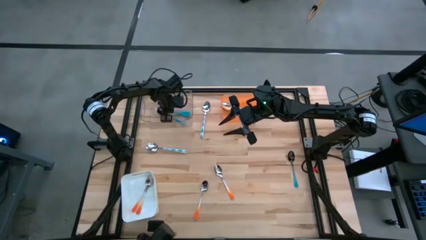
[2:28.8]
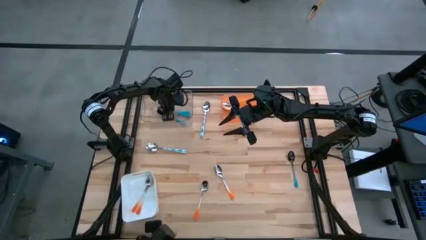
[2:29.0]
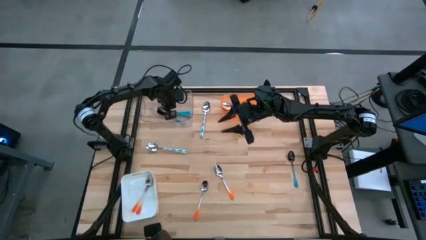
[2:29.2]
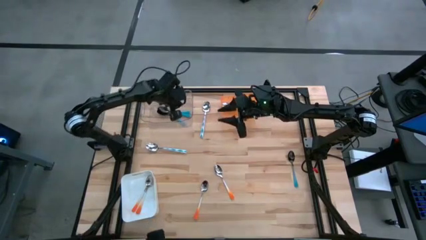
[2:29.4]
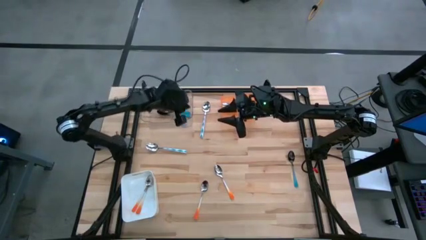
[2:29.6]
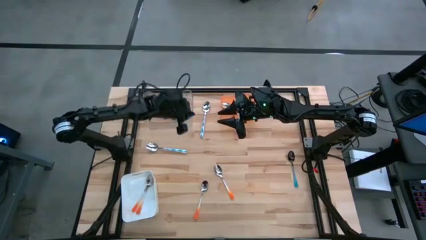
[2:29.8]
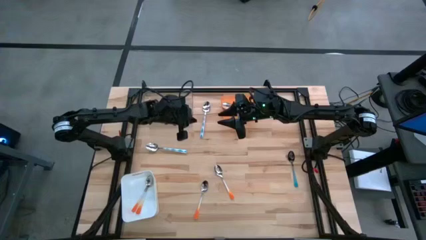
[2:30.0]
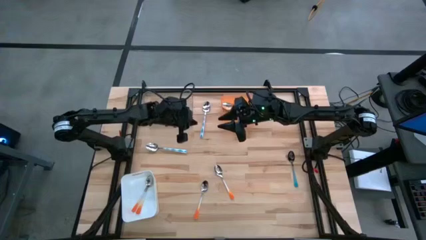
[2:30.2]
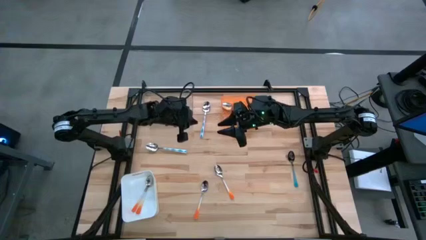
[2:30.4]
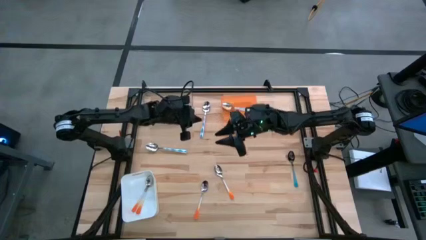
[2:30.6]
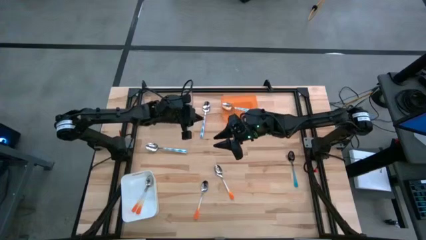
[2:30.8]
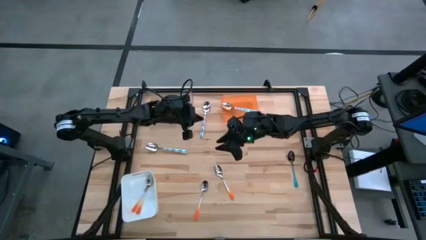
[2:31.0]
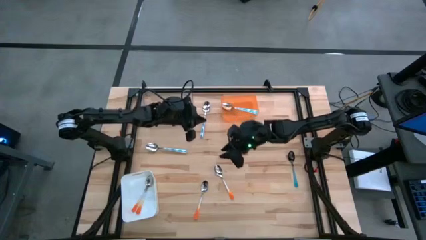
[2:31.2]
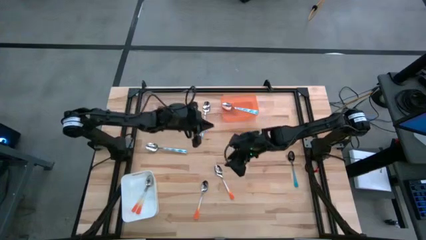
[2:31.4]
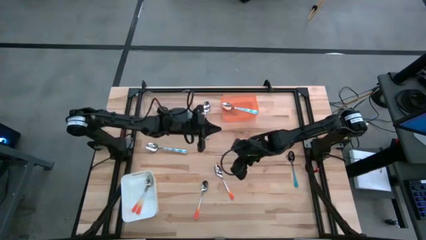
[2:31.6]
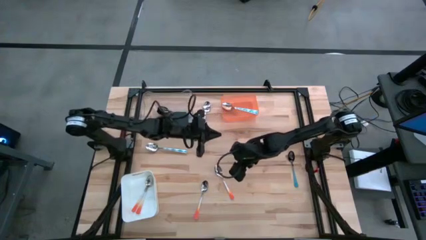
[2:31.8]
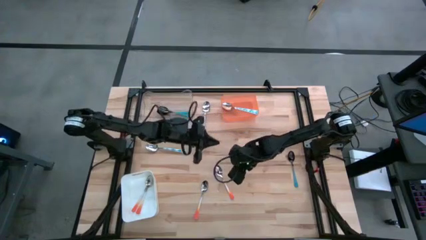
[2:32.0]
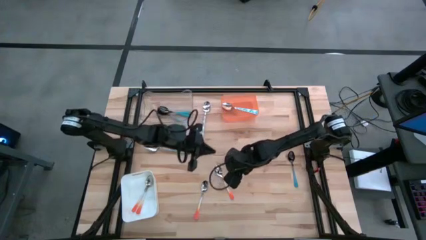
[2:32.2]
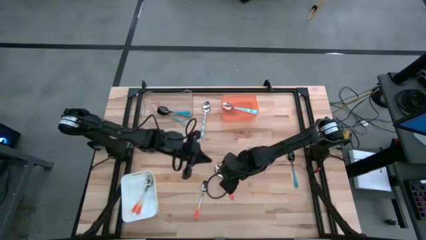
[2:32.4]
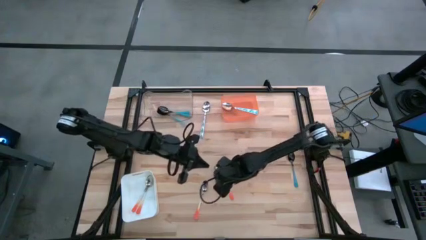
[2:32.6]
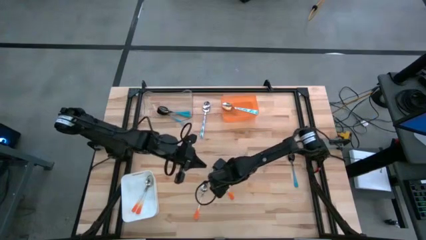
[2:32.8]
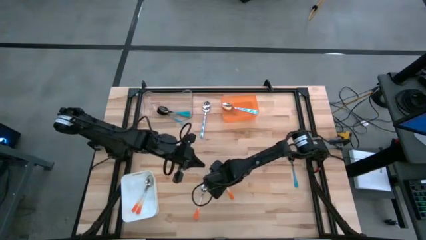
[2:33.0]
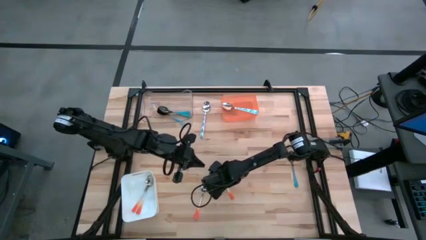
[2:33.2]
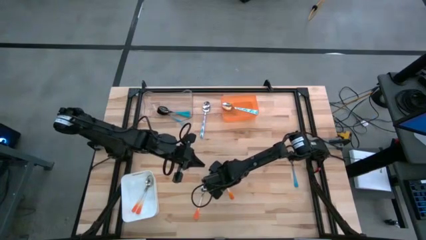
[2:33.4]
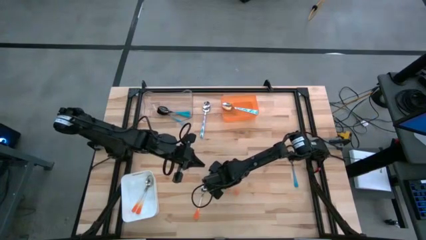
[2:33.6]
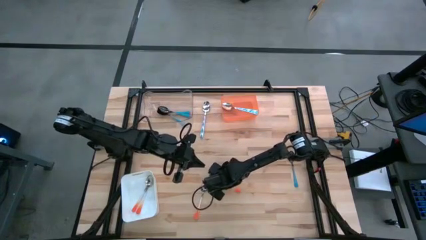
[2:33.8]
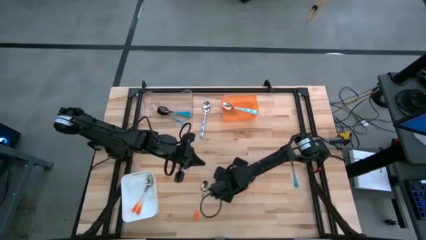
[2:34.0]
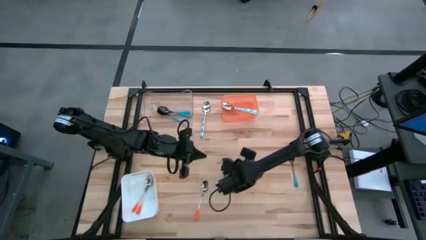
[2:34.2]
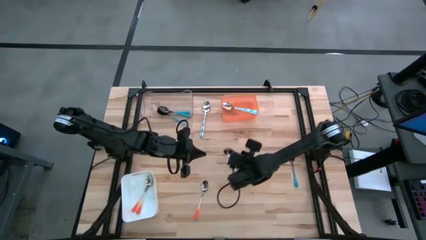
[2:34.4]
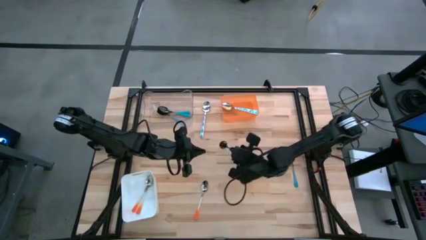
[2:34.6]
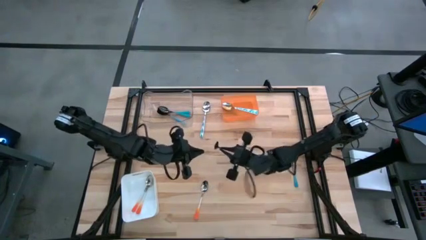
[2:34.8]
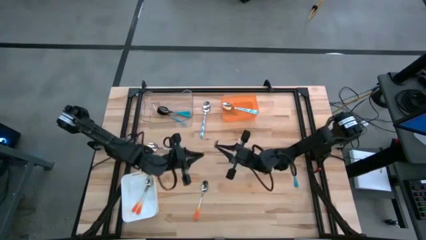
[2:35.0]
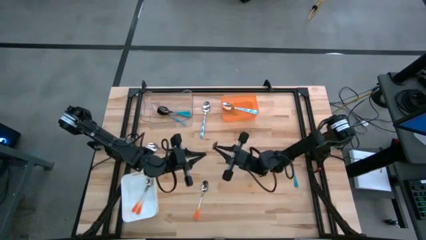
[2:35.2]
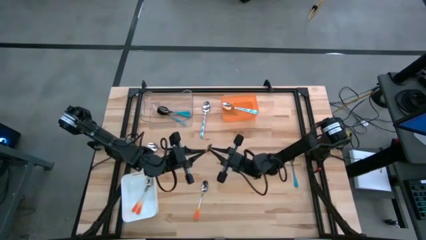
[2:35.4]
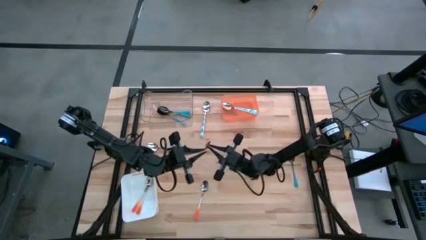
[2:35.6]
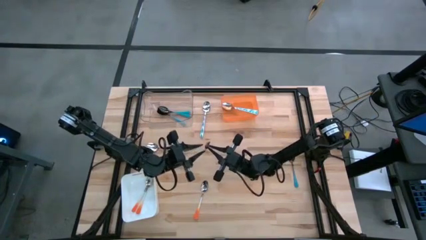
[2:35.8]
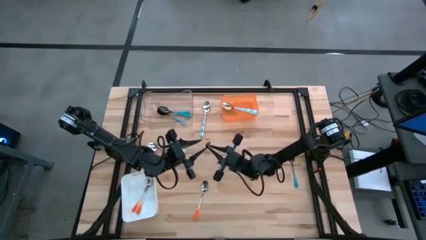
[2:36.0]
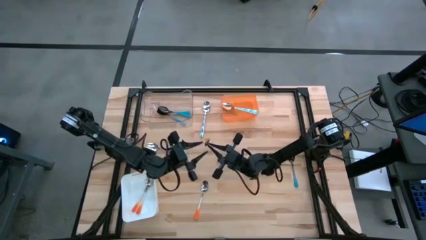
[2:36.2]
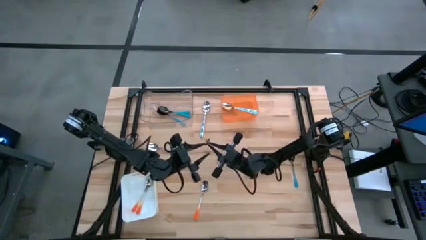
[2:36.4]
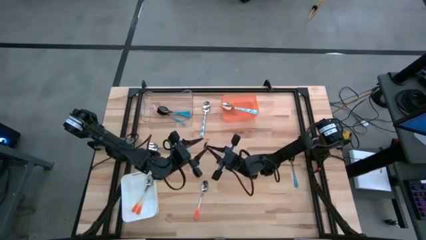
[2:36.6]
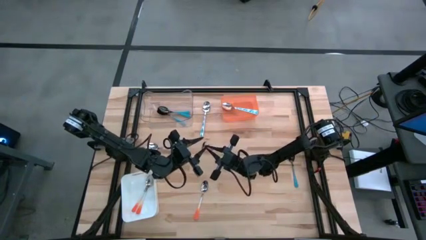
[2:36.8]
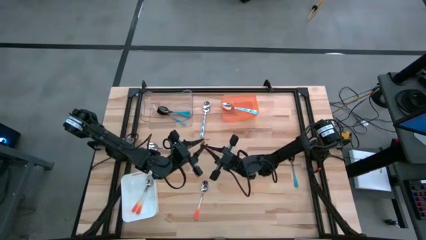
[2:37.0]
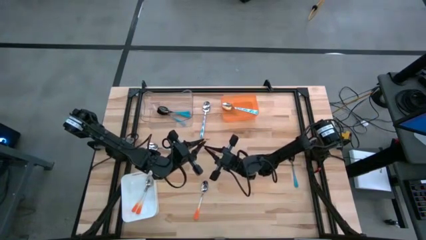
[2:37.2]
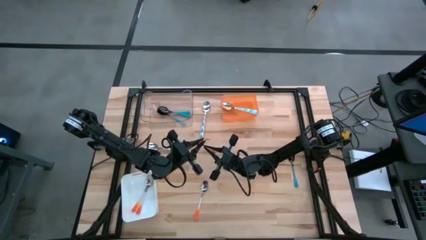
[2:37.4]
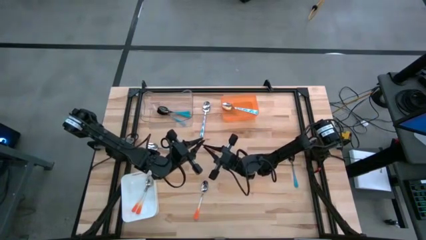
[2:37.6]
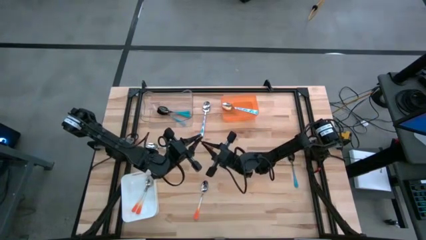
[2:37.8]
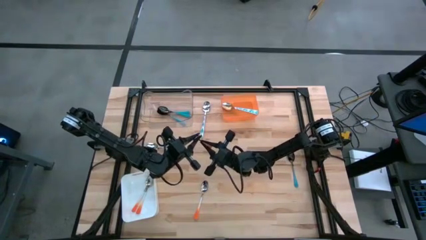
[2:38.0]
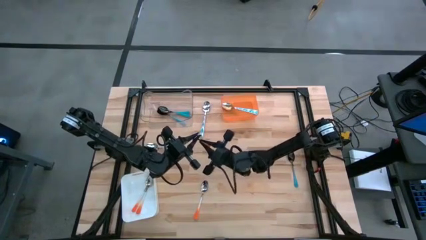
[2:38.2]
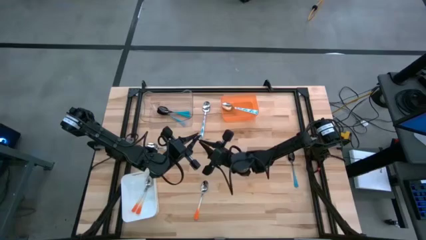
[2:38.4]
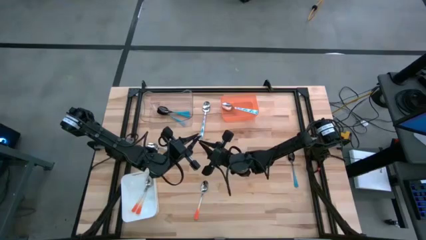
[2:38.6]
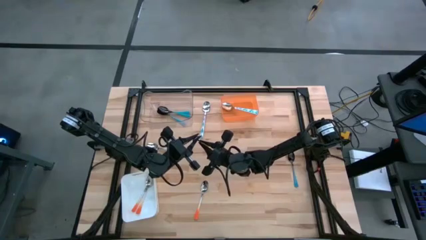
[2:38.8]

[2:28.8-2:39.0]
Task: Sort silverware by color (type)
Put the orange spoon into the white bin

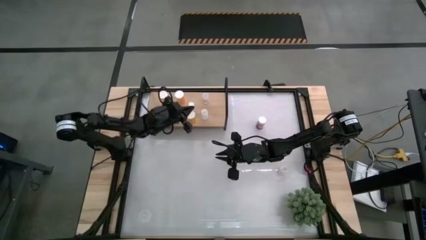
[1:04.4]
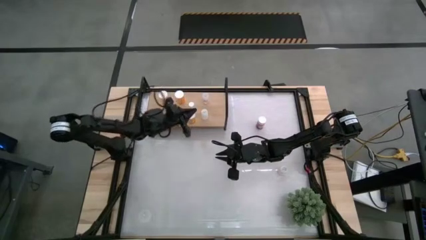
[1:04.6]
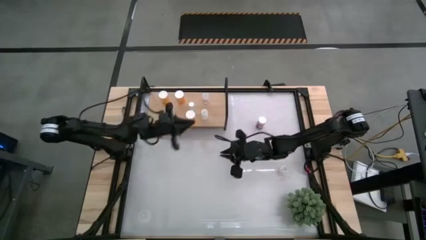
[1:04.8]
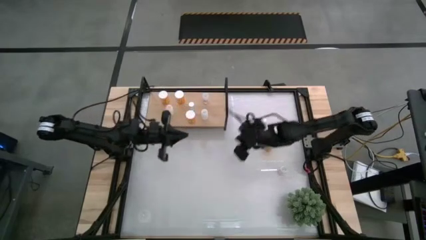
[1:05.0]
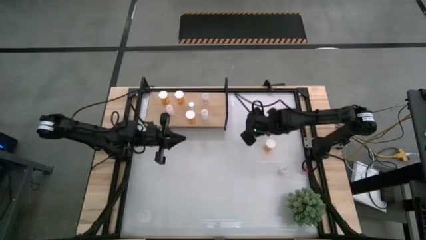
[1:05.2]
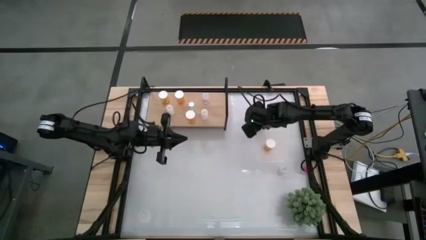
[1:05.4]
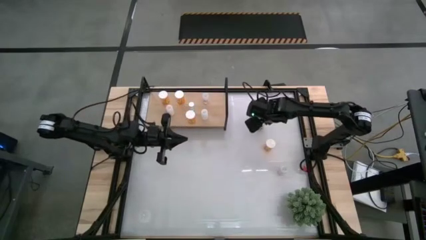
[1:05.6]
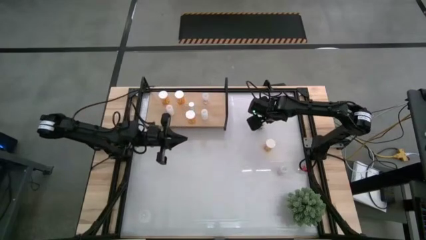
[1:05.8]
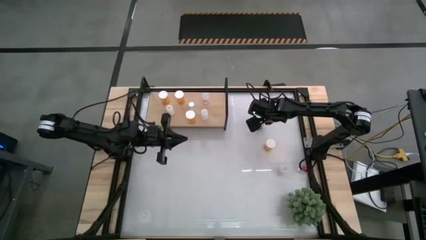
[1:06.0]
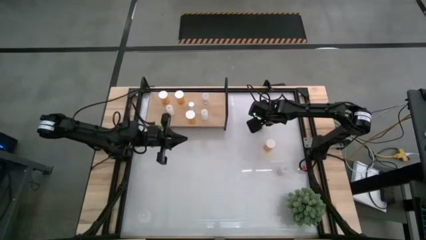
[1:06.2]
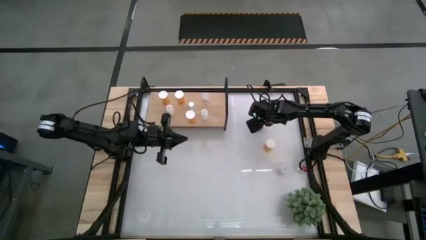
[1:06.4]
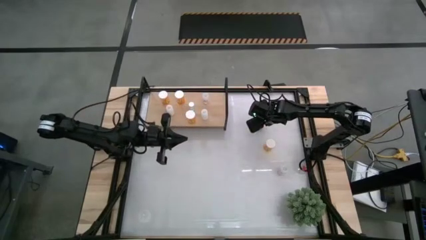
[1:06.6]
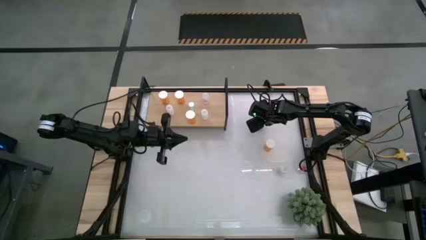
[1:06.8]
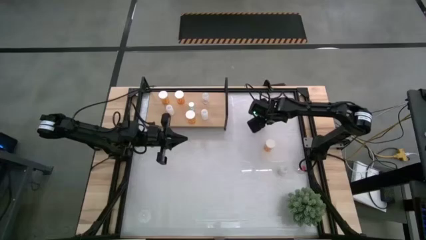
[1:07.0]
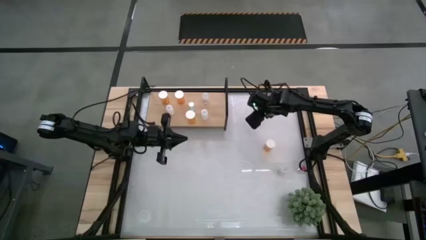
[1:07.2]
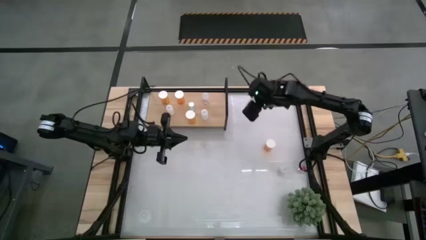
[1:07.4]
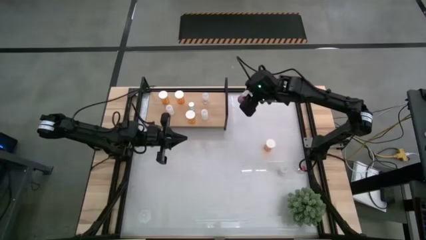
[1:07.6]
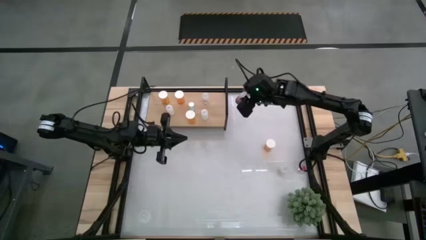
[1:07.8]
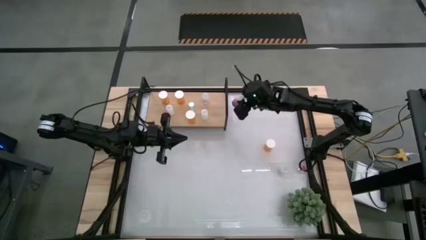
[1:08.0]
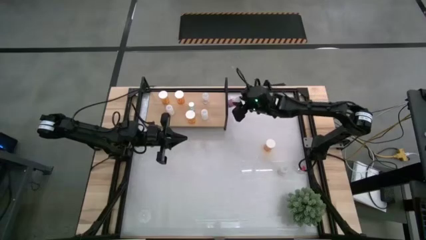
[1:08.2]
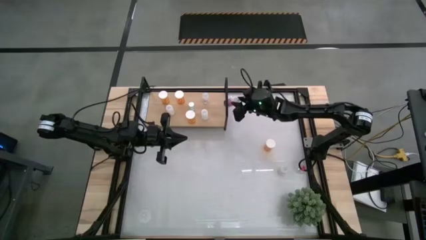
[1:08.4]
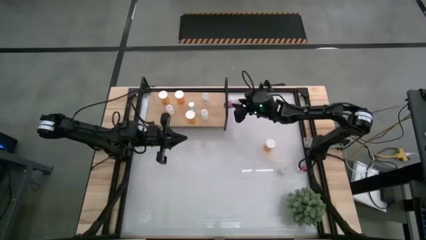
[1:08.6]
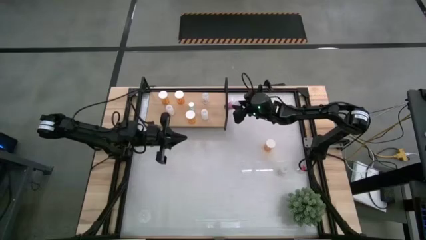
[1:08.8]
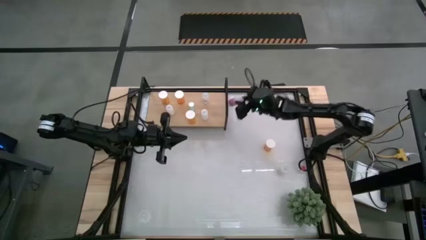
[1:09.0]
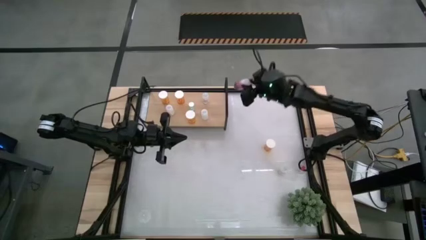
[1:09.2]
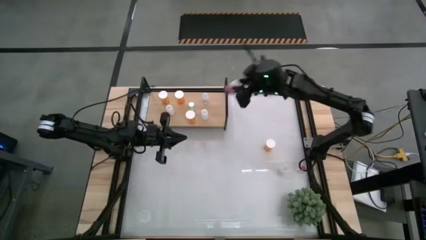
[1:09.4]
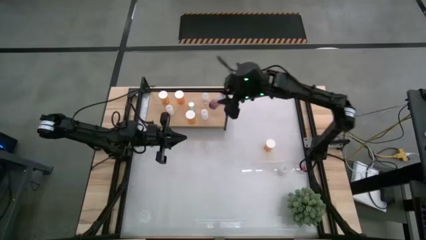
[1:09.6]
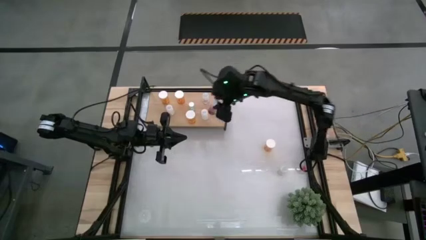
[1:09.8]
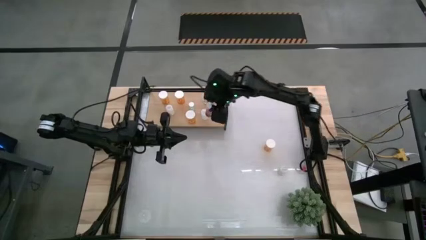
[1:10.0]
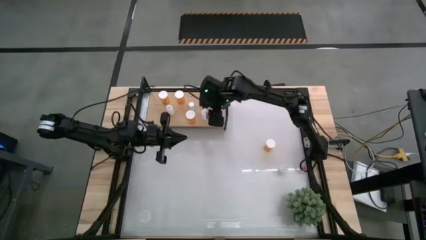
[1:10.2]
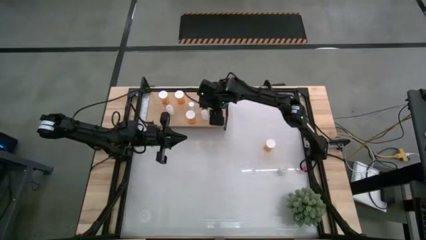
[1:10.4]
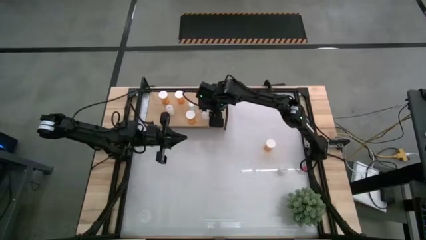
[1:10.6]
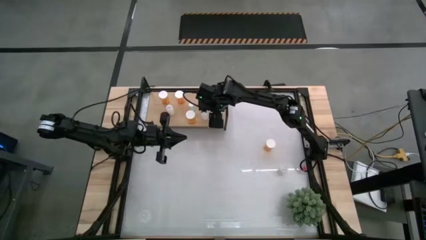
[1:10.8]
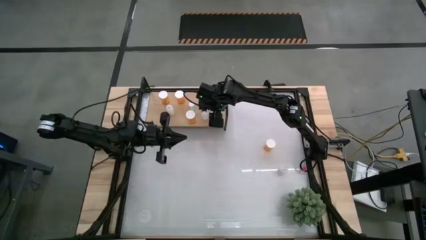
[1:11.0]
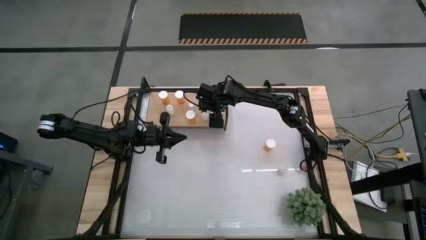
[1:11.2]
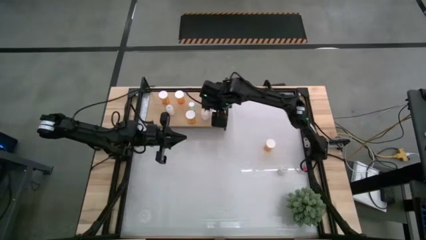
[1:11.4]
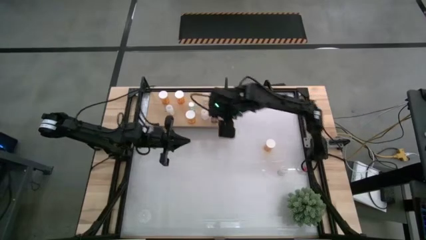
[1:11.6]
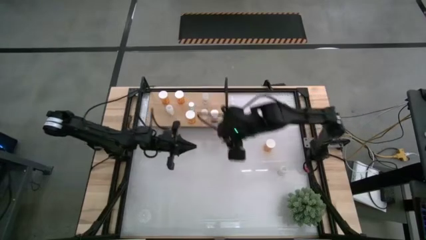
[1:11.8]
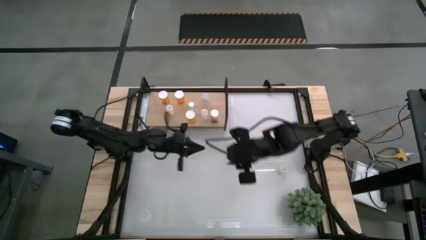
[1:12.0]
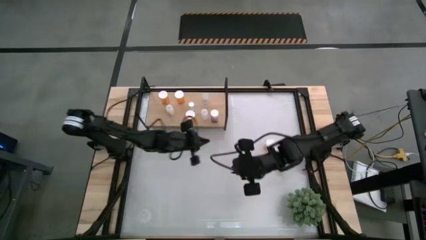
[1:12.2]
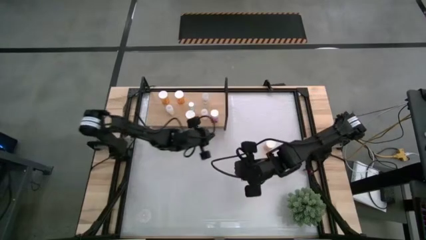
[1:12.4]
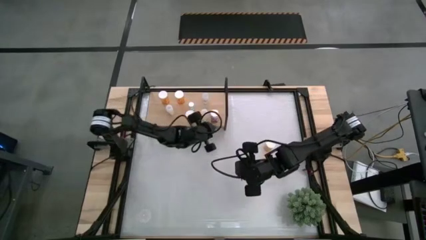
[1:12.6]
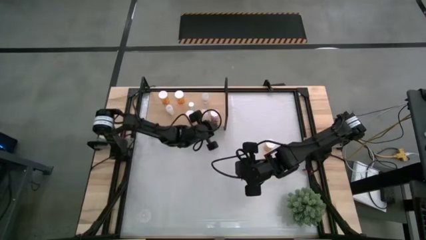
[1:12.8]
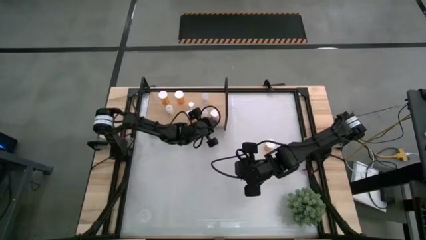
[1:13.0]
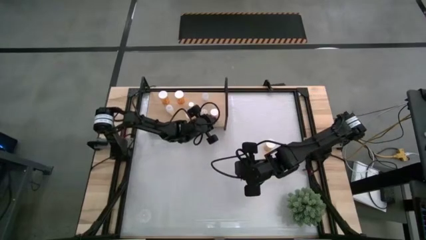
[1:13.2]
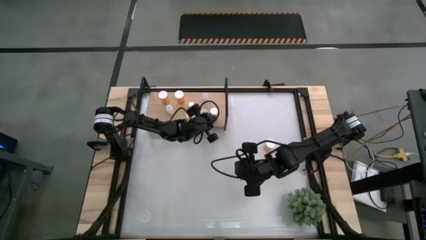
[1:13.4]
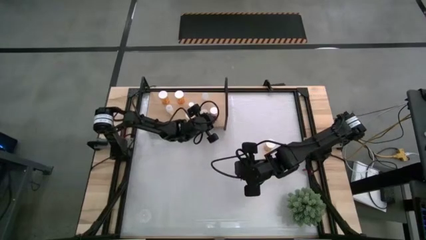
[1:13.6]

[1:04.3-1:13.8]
Task: Pick and place medicine bottles onto shelf by color
Put the large white pill bottle on the shelf
